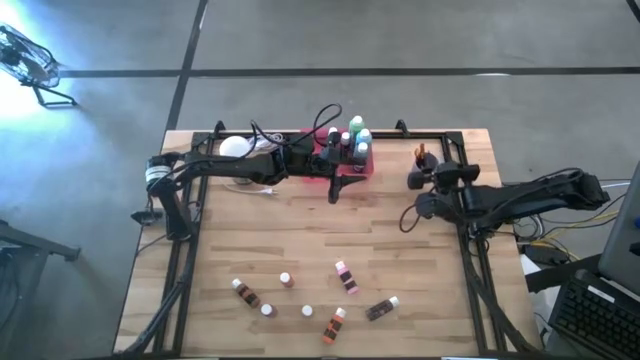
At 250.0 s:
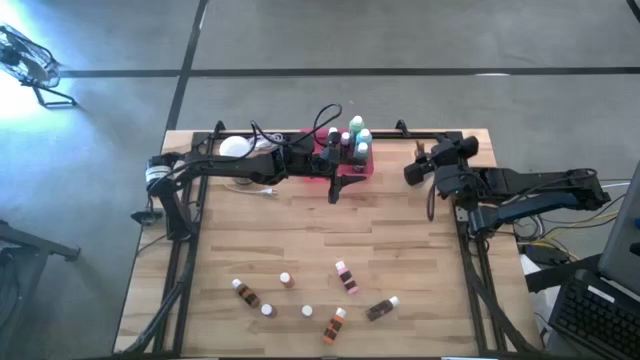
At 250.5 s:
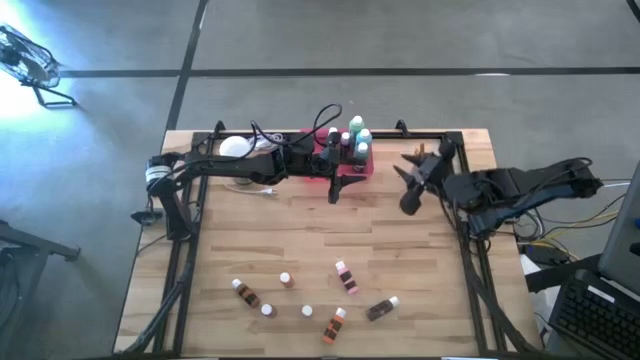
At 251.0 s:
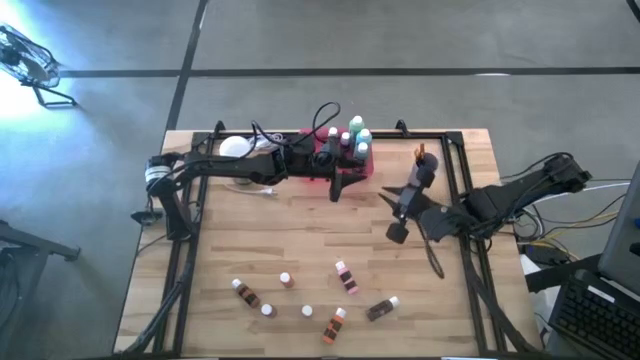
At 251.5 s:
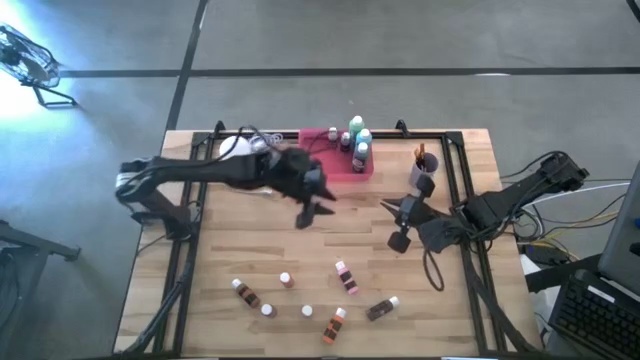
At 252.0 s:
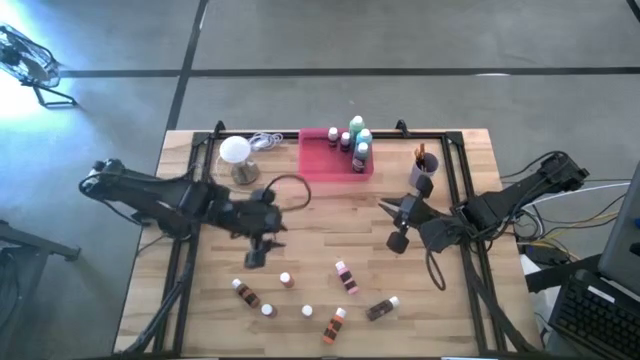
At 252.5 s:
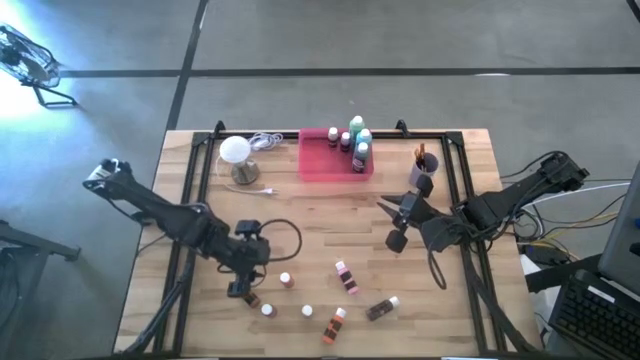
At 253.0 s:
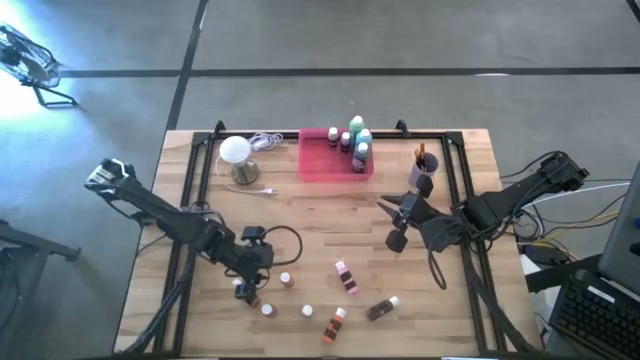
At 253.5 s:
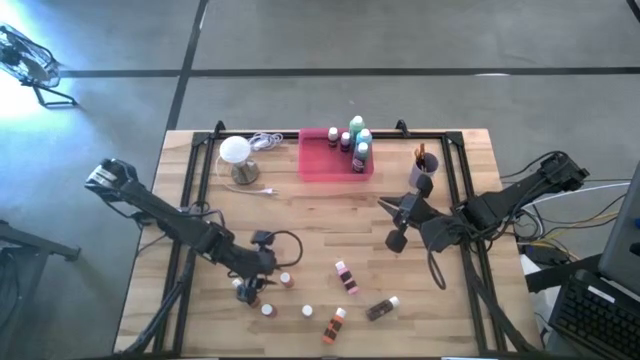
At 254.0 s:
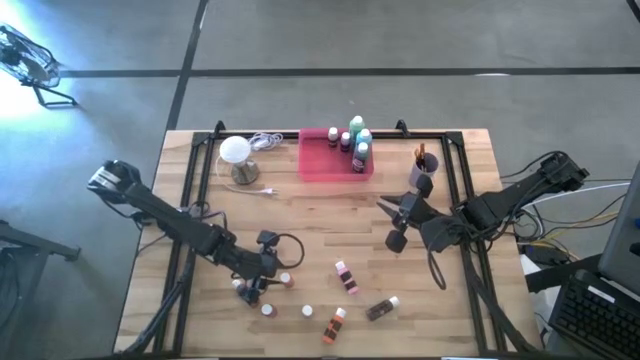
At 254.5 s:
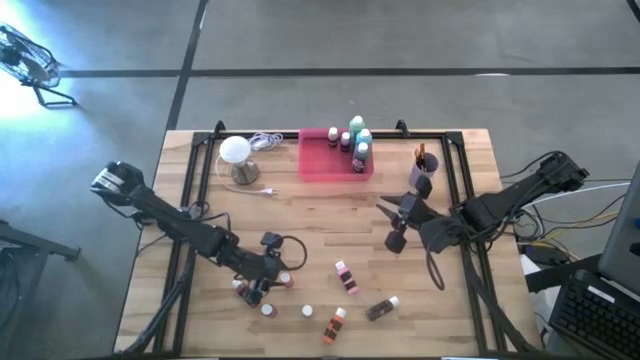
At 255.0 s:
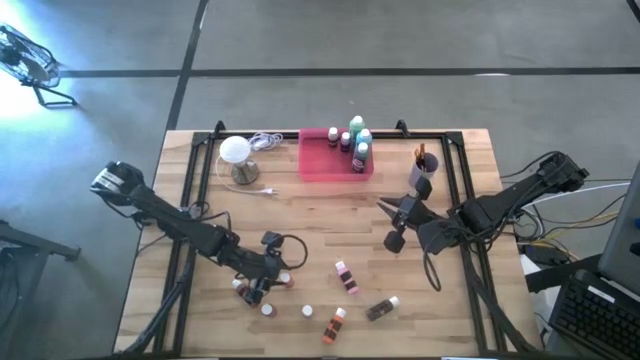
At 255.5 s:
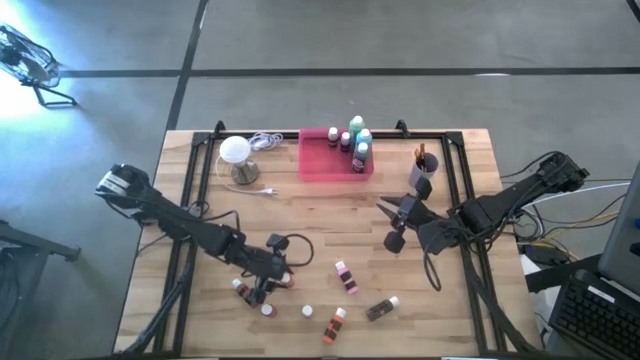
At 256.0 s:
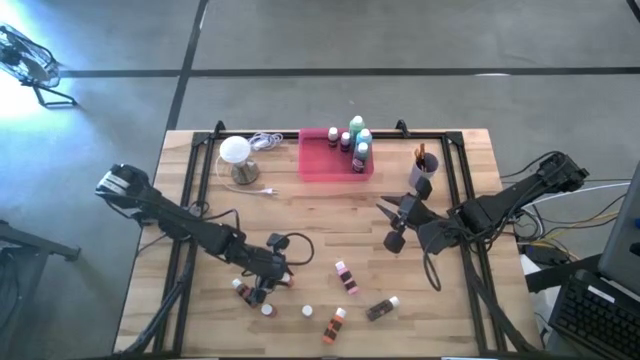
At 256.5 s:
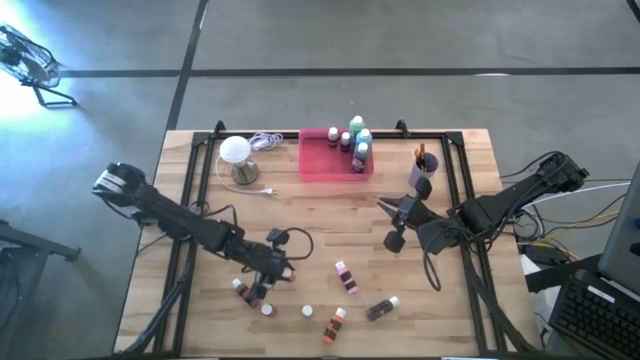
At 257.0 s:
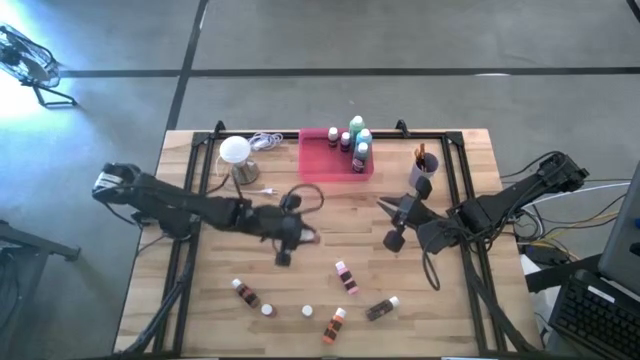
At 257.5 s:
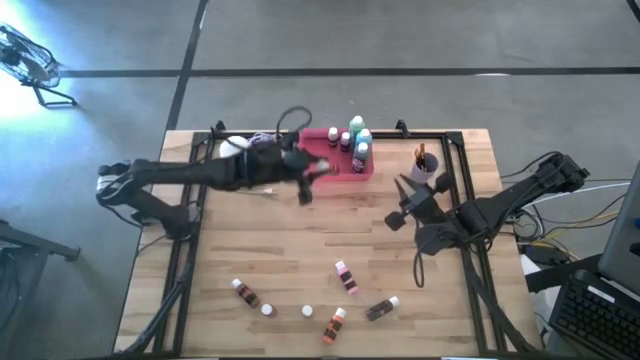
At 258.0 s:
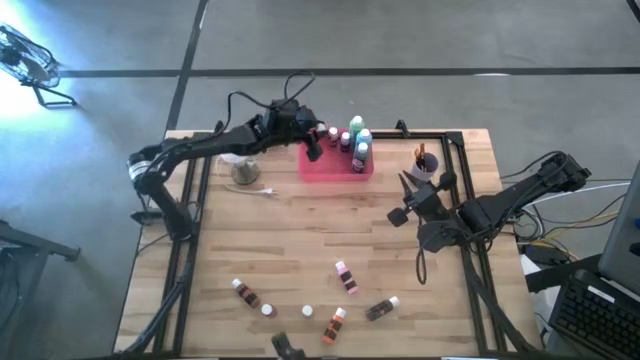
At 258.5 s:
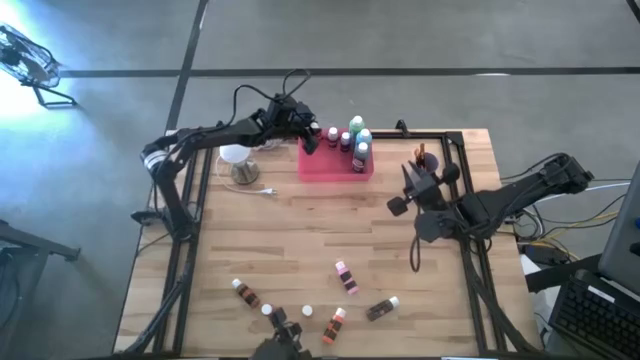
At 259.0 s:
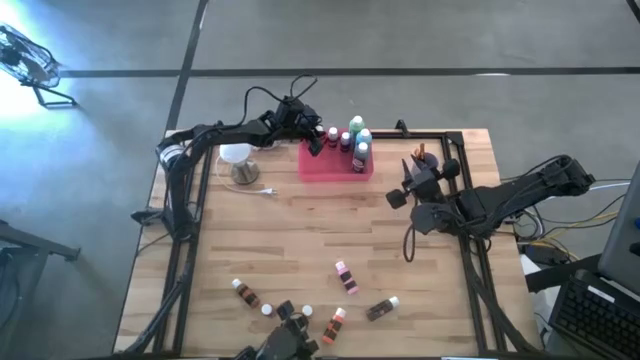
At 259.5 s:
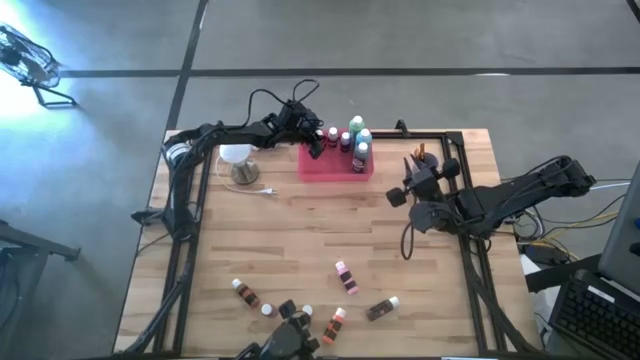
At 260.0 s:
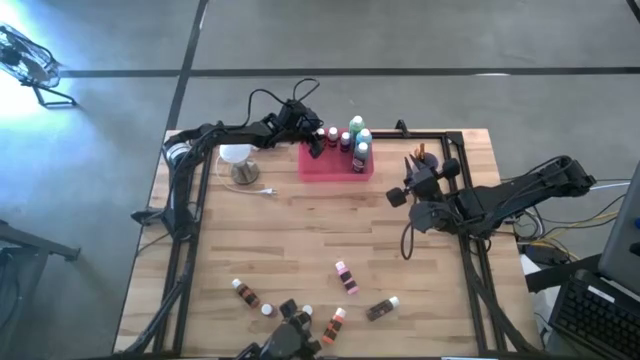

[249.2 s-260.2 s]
Task: Pick & Place Paint Supplies
Put the red black paint bottle into the pink bin

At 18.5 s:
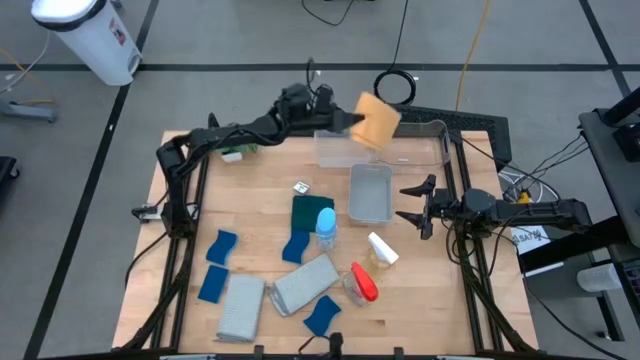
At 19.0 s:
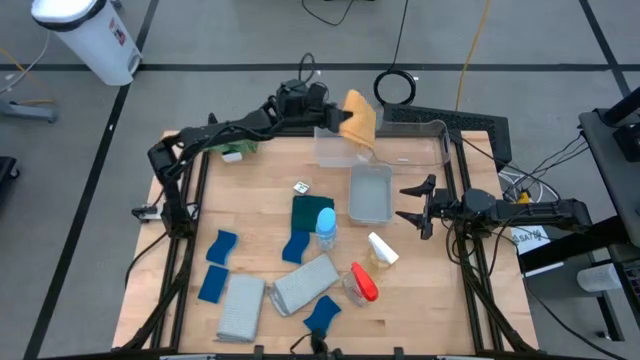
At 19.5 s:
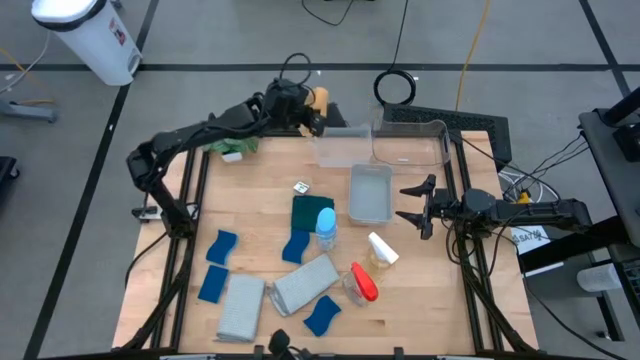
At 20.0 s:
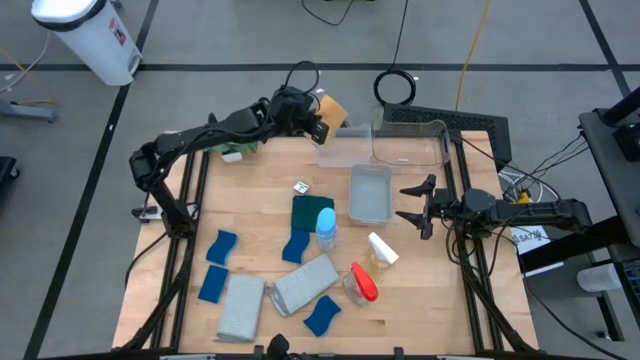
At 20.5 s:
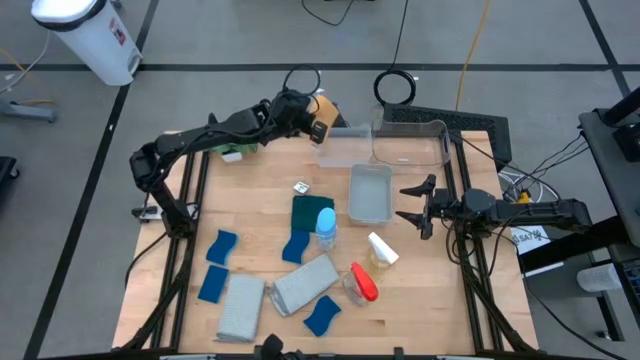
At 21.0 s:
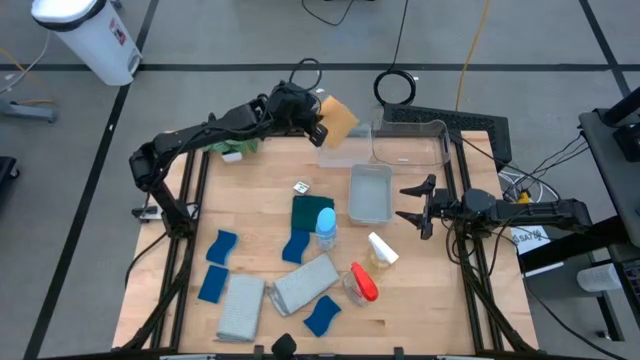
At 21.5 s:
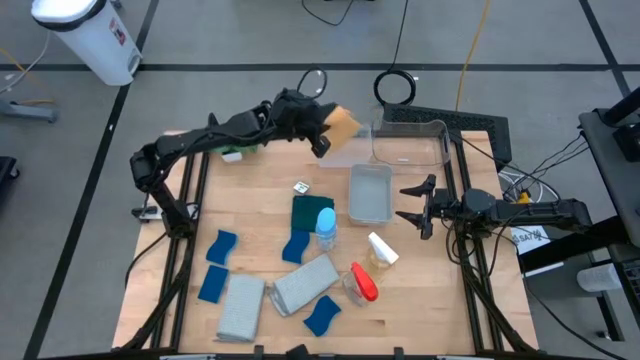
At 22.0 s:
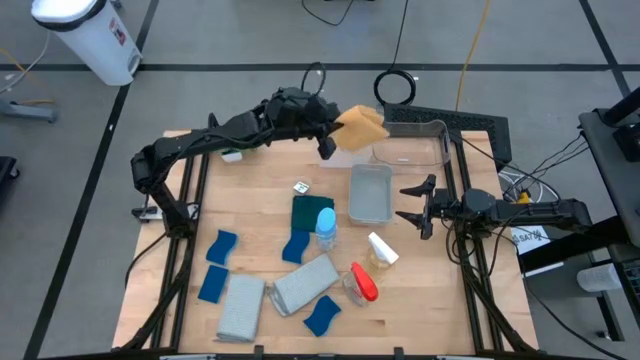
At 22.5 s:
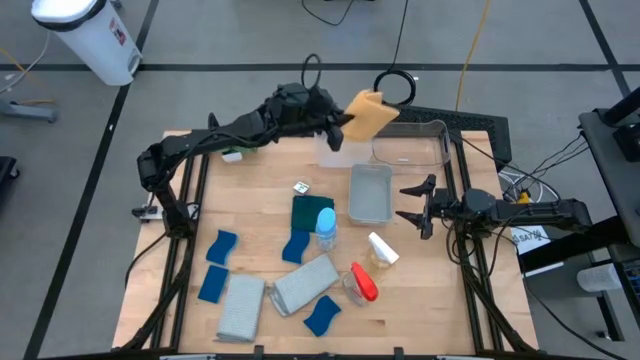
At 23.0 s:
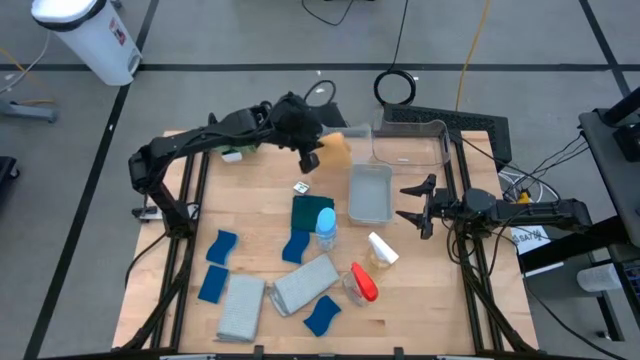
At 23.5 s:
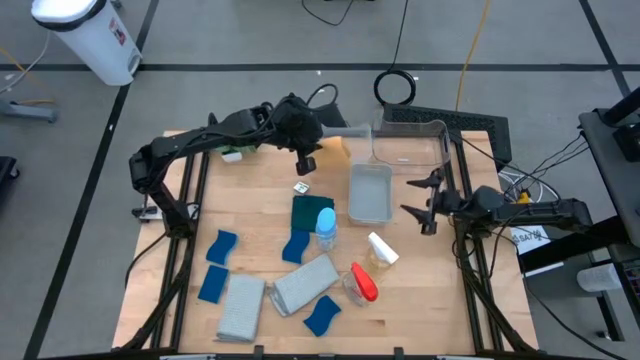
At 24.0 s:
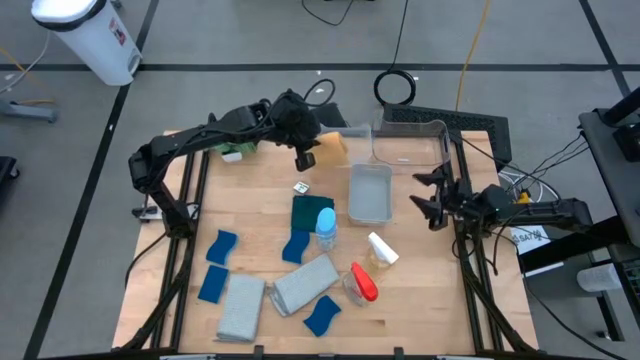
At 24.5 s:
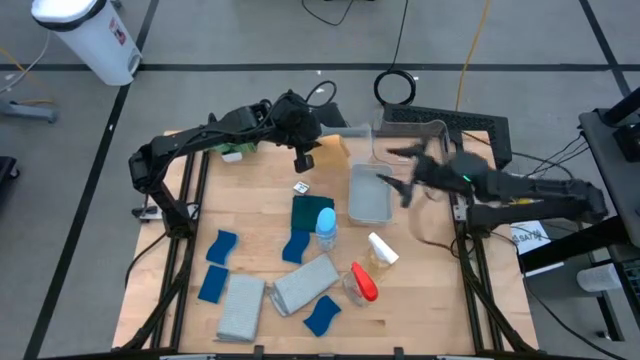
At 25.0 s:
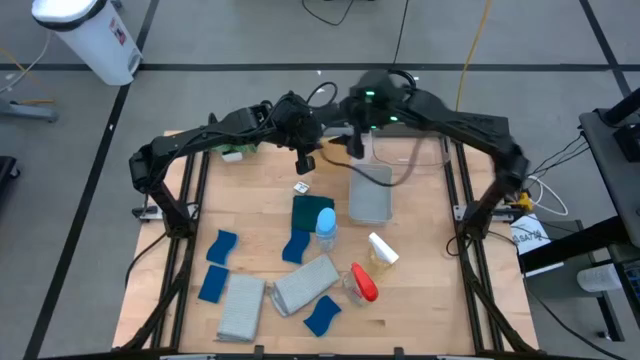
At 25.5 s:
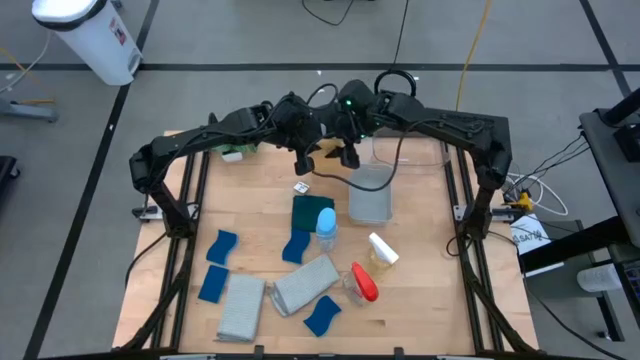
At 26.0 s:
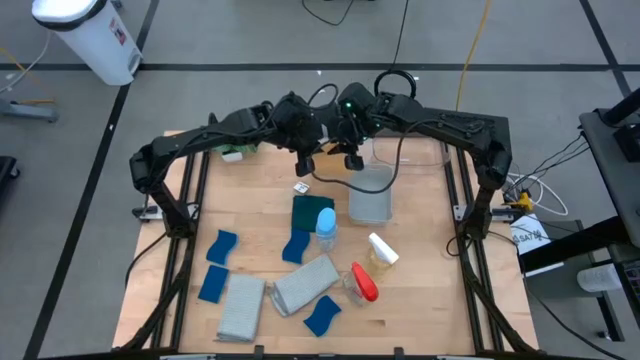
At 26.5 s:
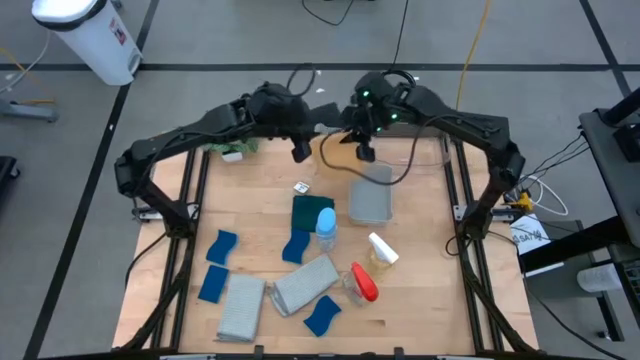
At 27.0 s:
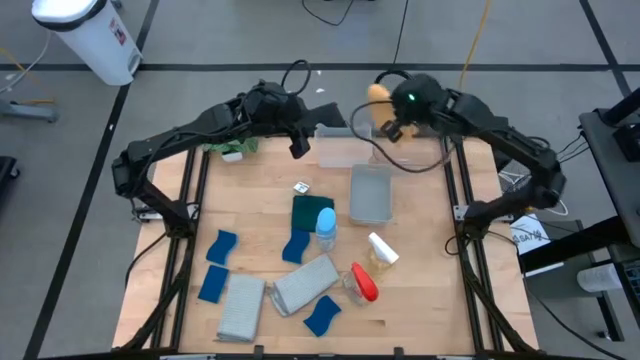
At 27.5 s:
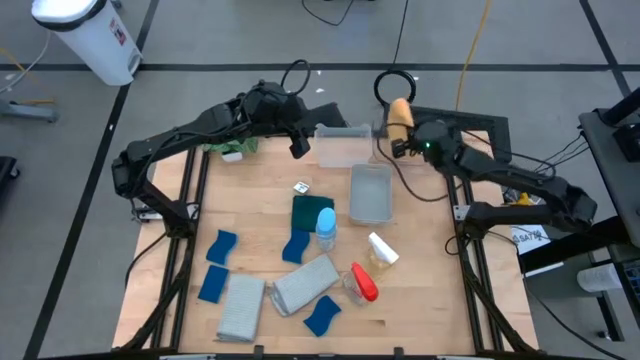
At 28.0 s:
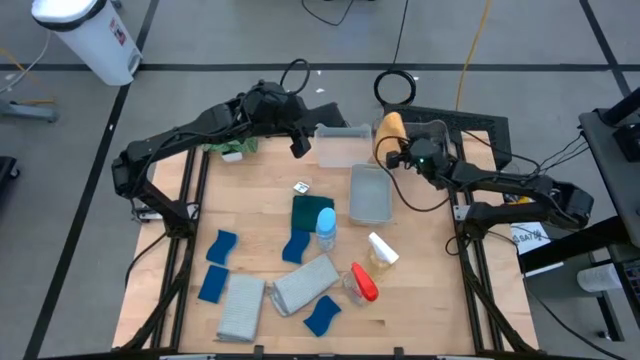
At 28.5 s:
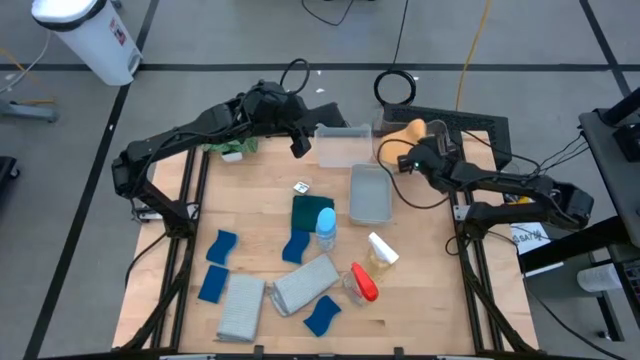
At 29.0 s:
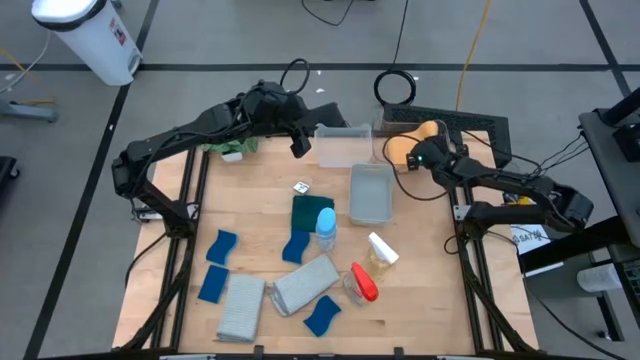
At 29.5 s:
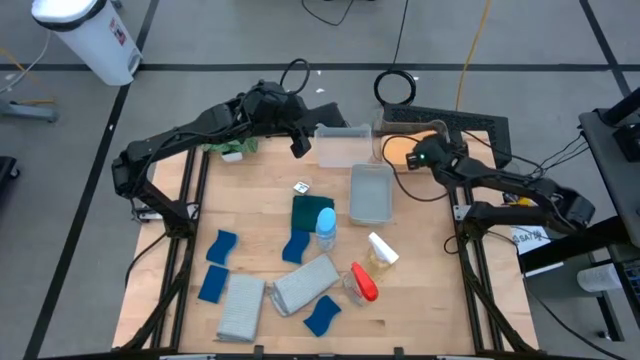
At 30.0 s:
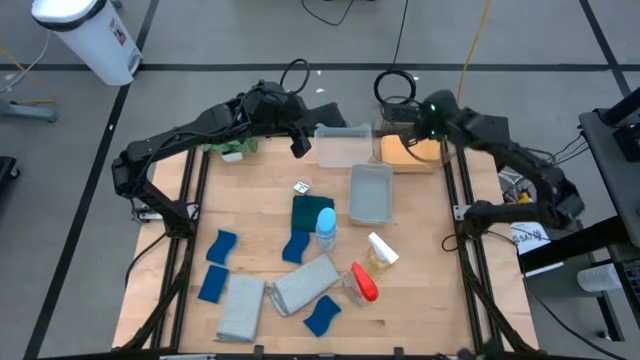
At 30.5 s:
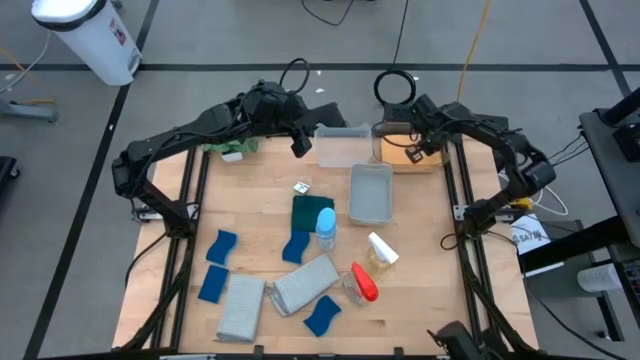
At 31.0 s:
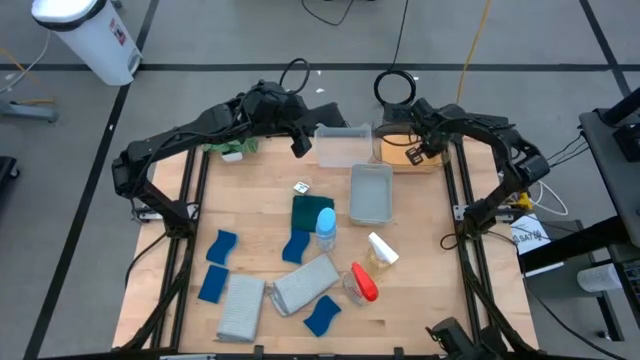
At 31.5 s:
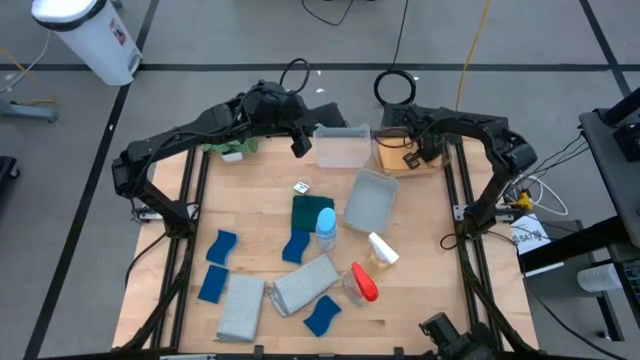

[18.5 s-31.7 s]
Task: Pick & Place Kitchen Items
Put the yellow towel into the top right transparent bin
